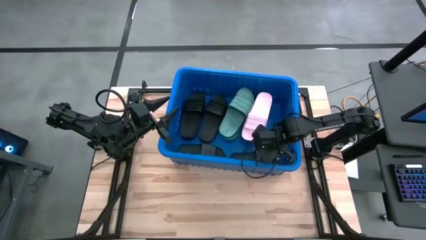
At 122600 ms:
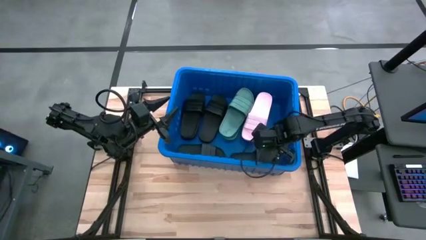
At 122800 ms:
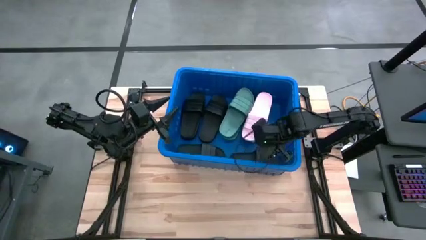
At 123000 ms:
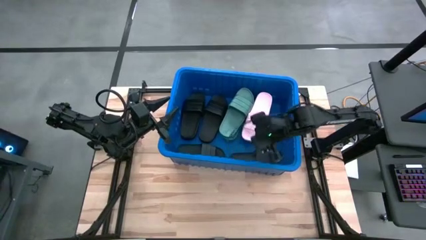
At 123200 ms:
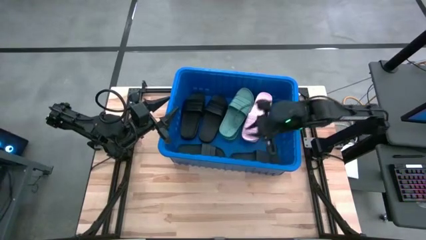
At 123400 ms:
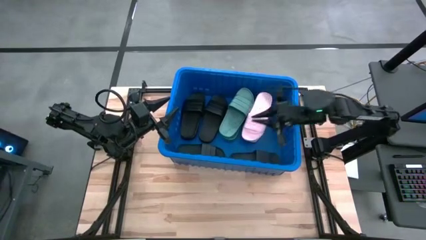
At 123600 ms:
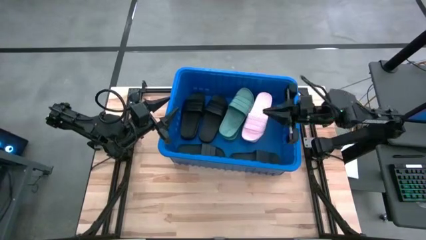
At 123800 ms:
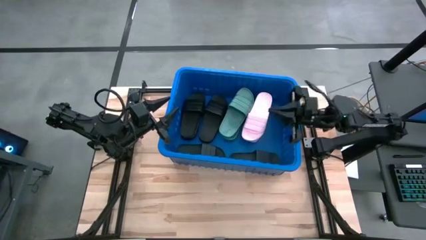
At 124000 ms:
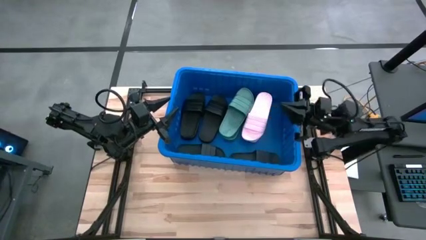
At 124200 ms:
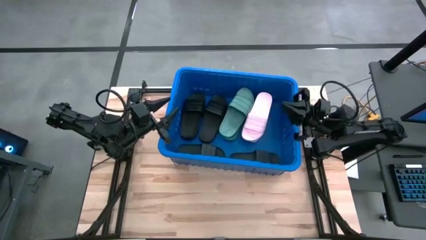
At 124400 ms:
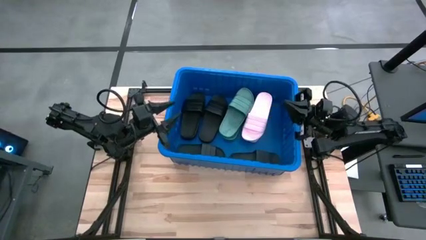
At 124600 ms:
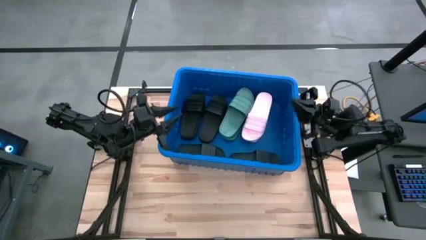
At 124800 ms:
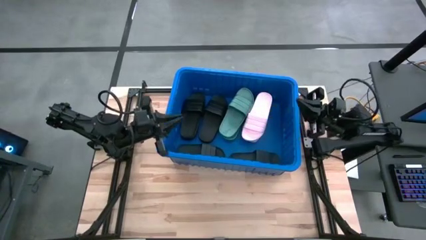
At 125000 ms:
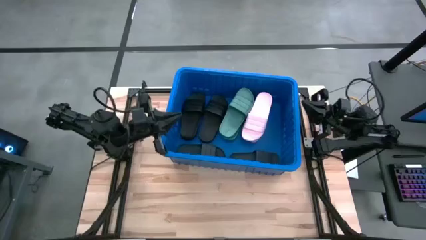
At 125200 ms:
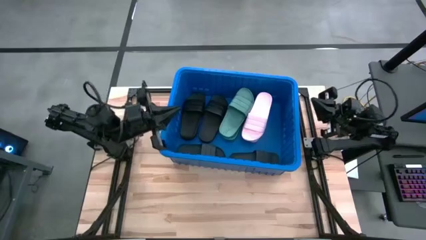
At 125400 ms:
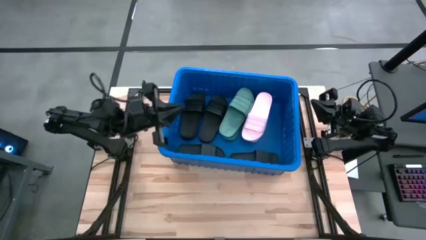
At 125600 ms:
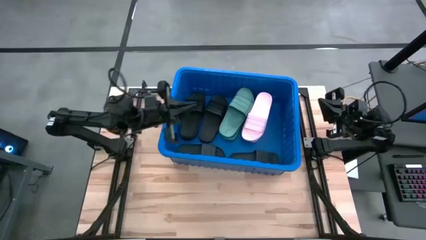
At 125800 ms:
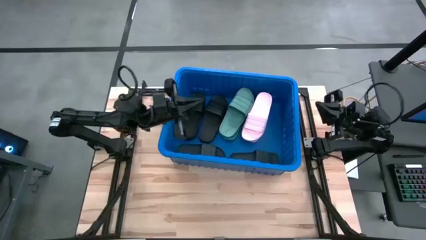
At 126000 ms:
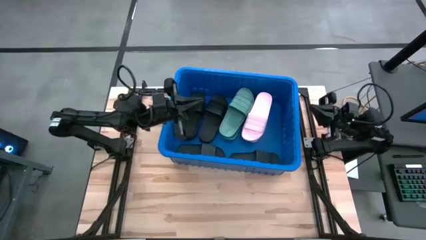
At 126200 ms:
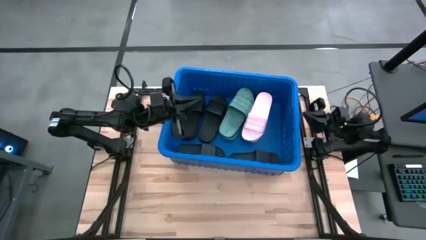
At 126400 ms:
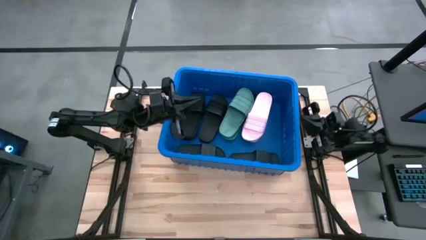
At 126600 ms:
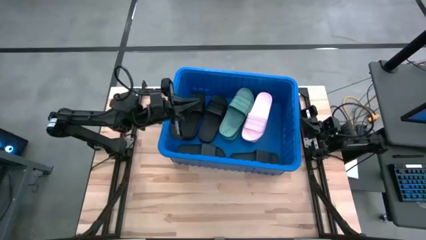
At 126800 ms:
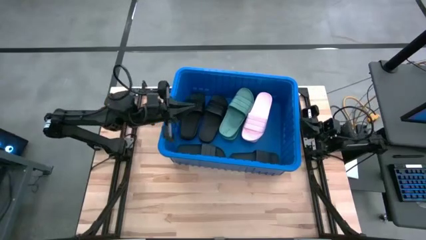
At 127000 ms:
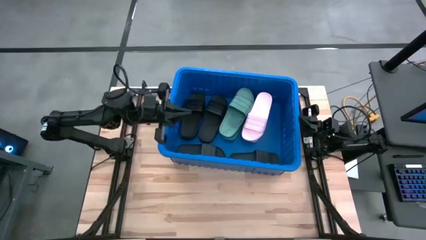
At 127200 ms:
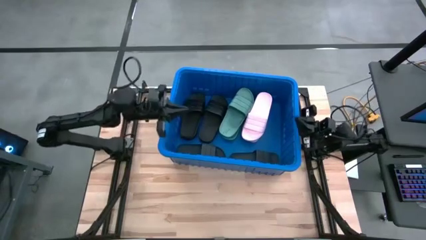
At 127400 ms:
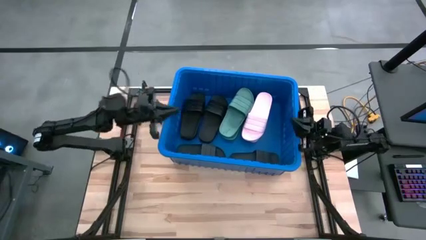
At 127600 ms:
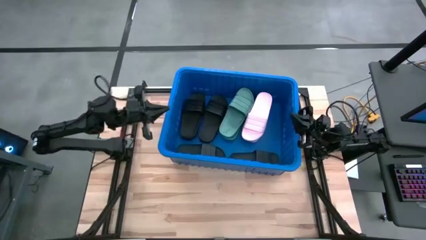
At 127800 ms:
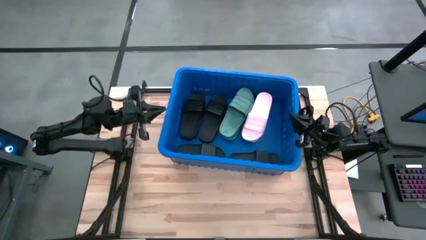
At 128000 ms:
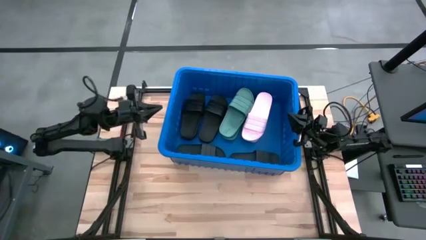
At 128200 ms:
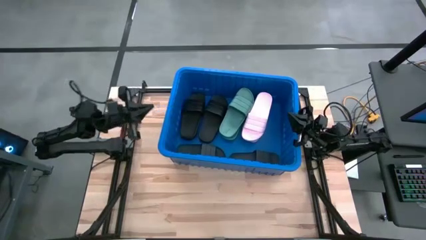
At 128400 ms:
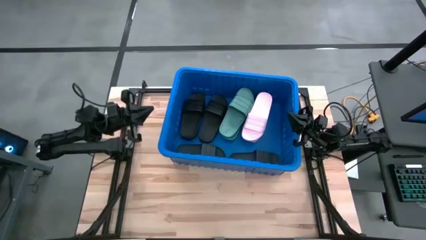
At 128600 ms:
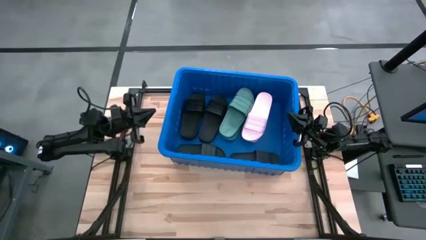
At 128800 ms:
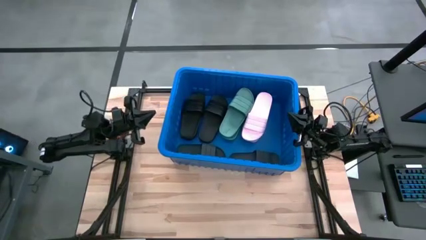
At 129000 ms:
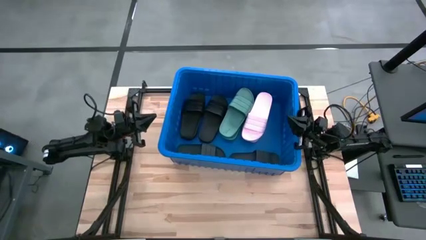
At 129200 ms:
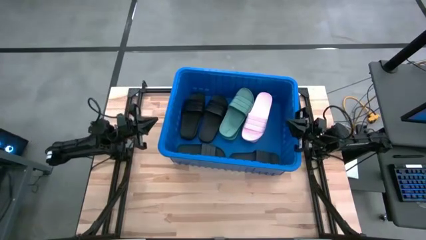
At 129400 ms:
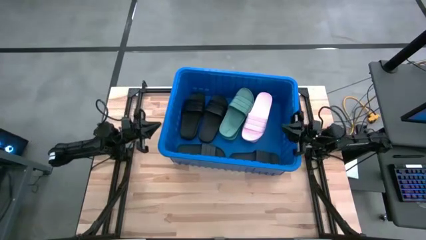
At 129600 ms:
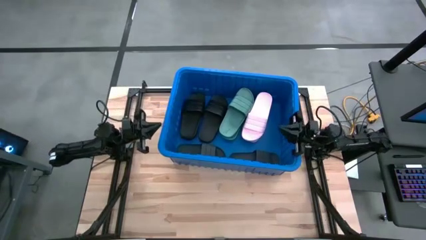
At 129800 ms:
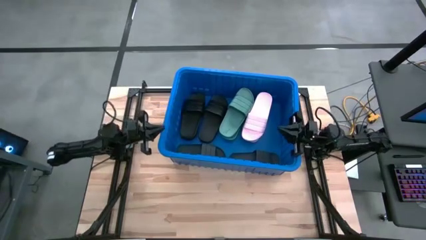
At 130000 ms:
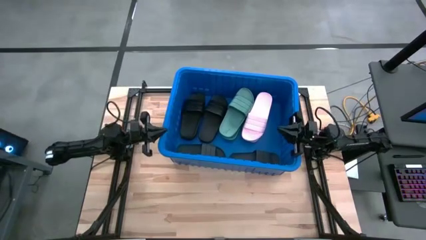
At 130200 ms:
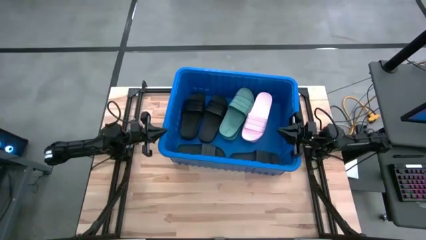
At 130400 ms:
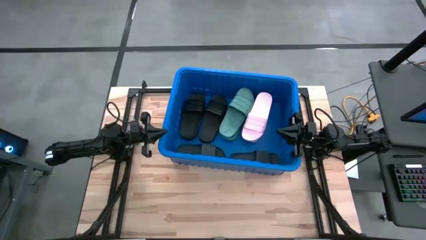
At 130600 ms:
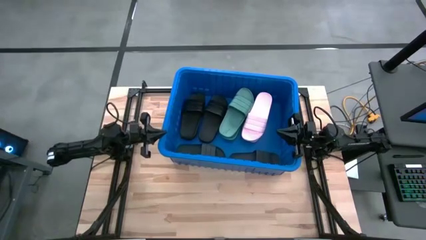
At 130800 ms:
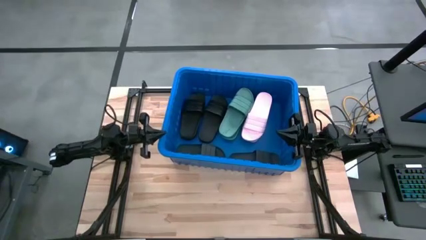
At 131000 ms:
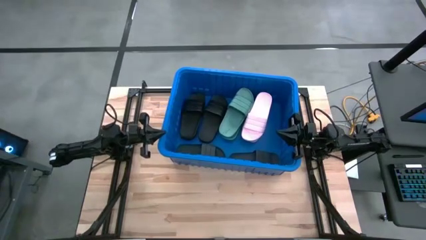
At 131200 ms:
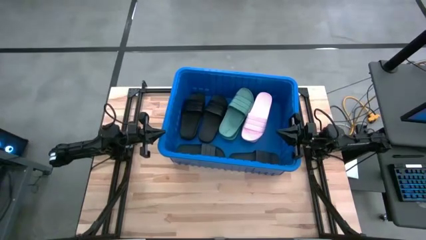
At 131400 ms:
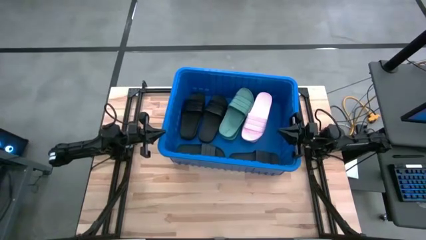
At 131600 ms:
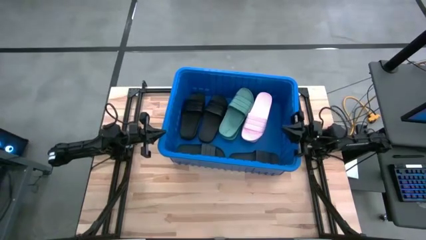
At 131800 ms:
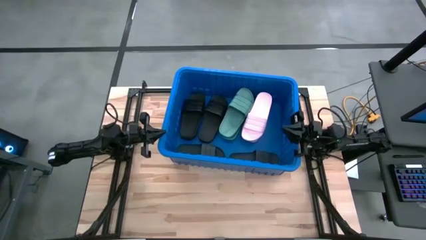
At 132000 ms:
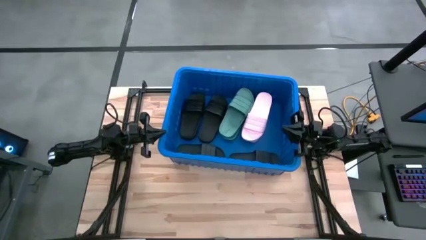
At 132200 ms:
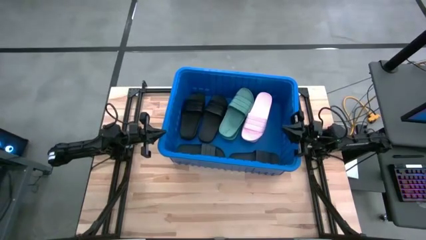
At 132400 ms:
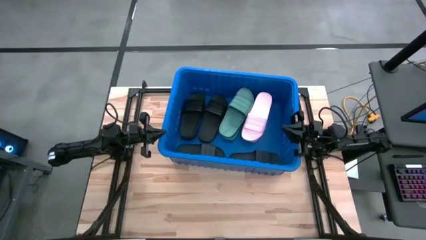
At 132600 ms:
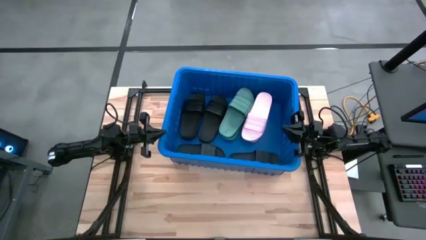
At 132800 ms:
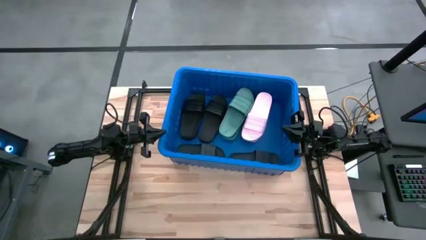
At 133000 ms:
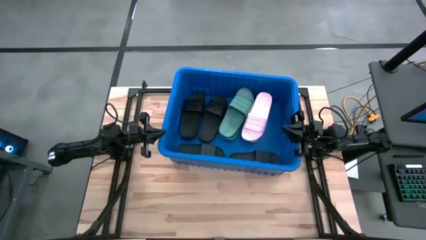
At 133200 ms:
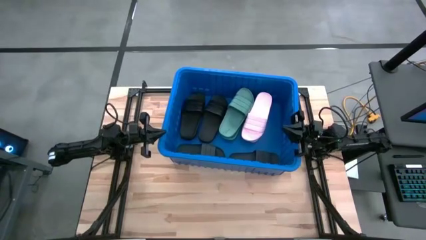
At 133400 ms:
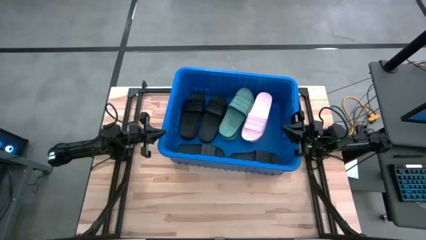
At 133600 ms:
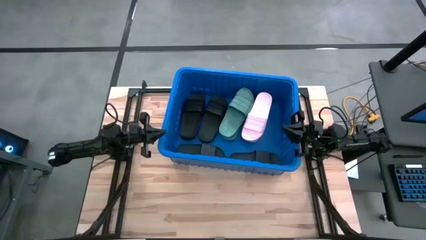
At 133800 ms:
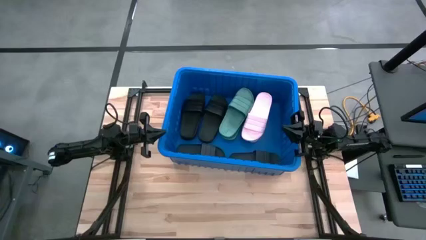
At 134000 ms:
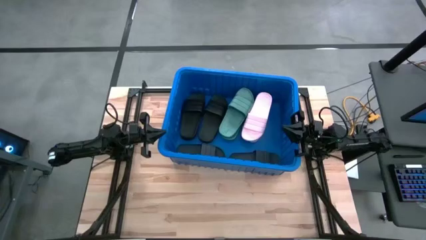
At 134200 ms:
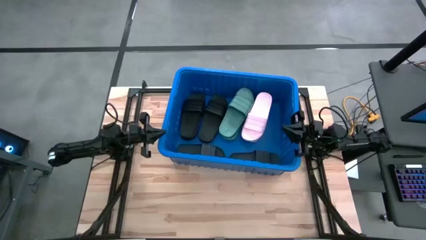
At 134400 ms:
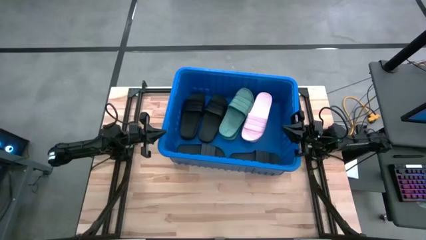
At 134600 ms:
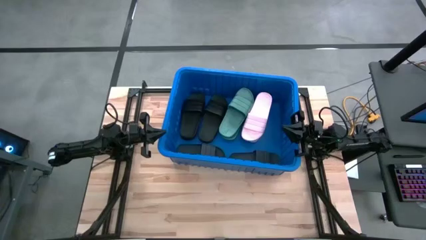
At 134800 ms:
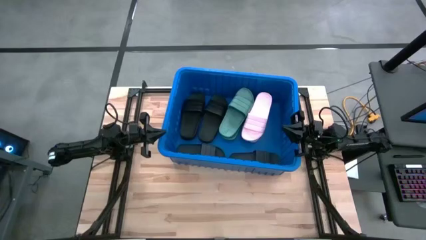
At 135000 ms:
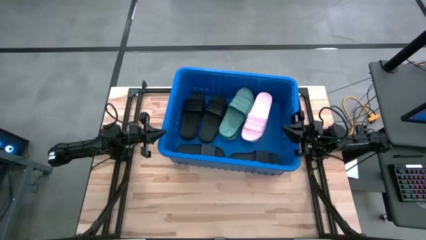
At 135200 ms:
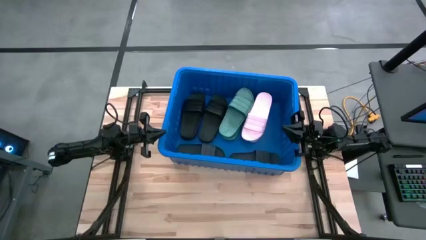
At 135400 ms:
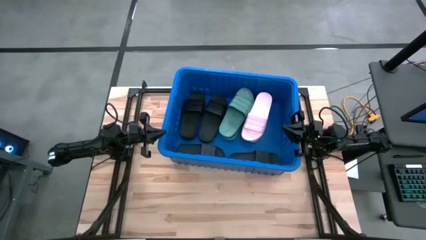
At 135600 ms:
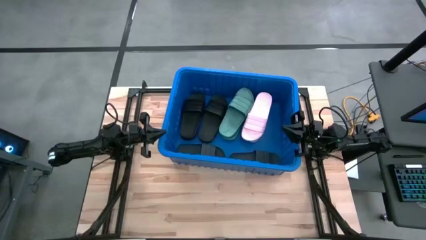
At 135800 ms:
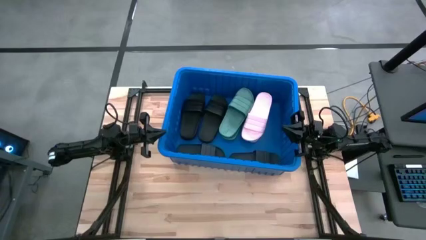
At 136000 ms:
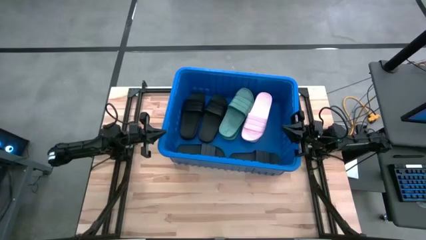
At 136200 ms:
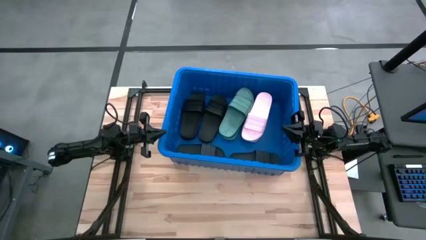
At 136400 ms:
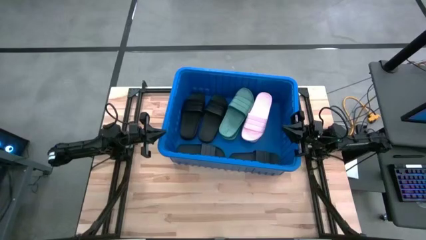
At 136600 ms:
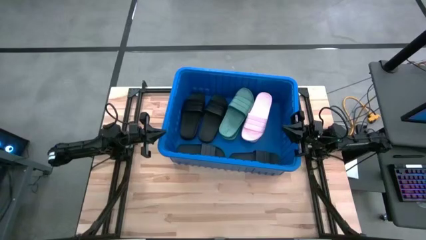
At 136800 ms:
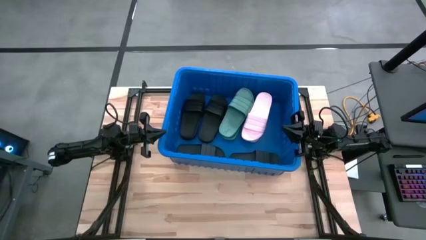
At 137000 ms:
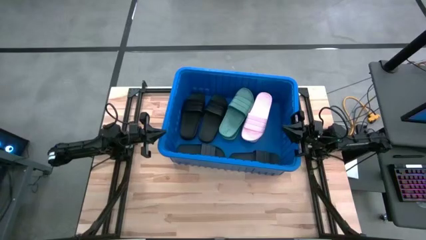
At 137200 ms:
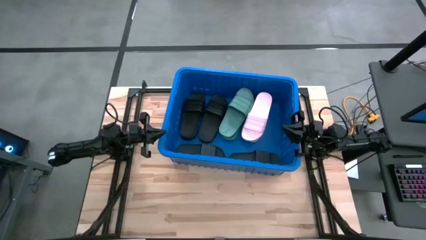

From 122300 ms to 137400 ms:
Task: Pick and place slides into bin
Return to Home Position
